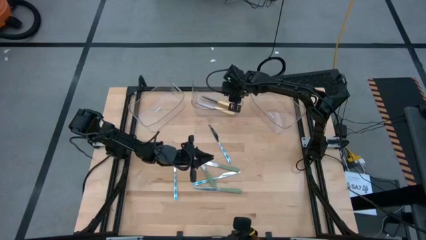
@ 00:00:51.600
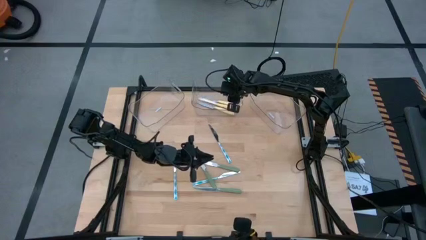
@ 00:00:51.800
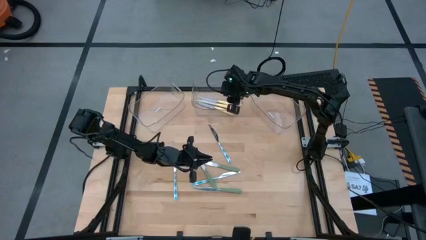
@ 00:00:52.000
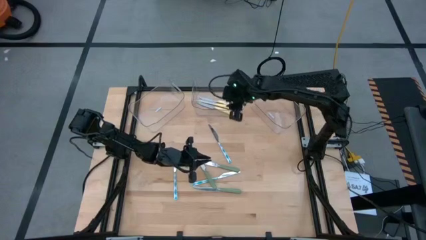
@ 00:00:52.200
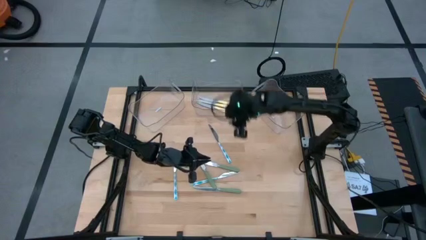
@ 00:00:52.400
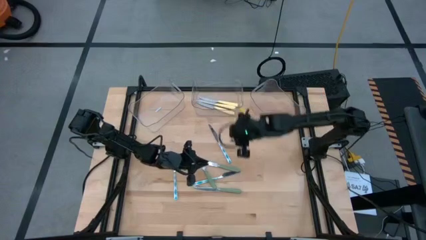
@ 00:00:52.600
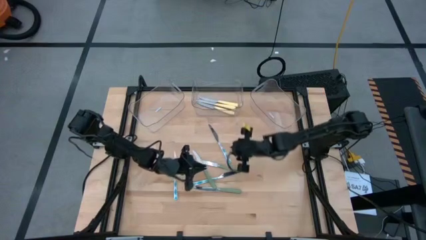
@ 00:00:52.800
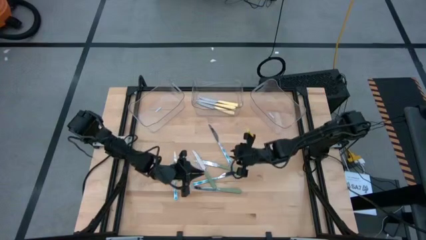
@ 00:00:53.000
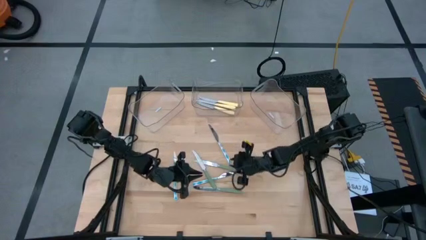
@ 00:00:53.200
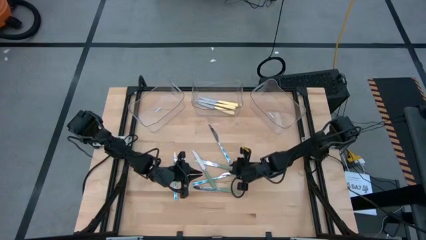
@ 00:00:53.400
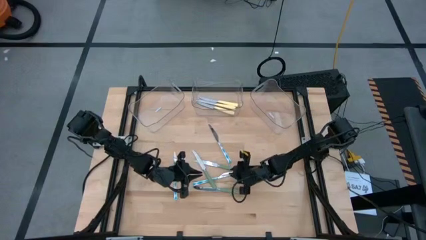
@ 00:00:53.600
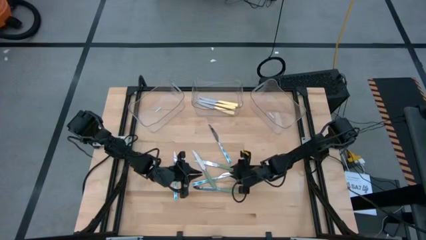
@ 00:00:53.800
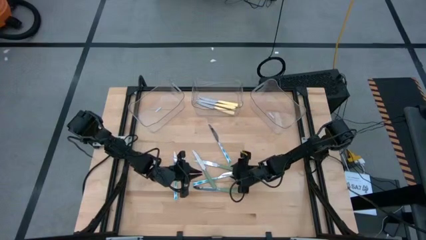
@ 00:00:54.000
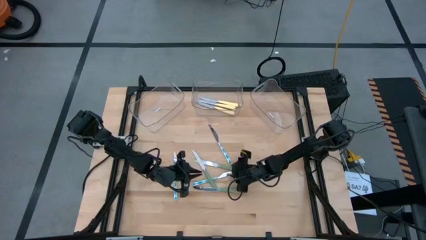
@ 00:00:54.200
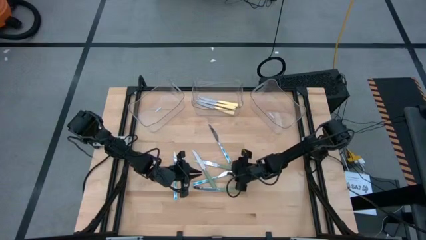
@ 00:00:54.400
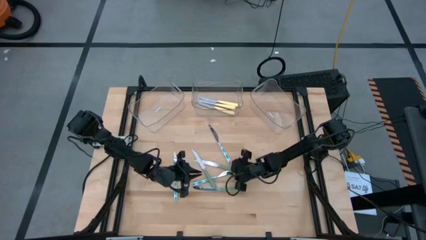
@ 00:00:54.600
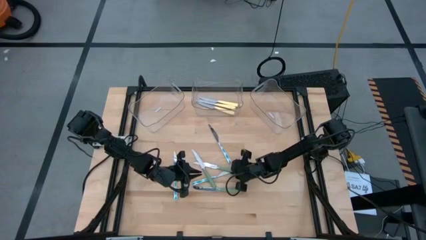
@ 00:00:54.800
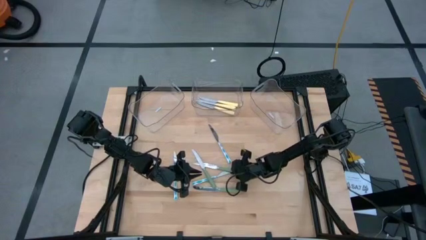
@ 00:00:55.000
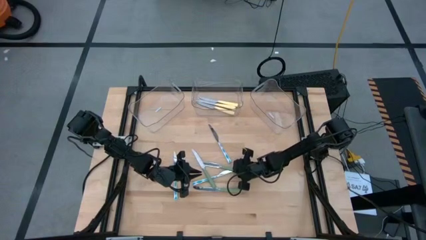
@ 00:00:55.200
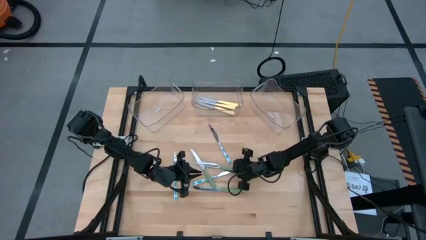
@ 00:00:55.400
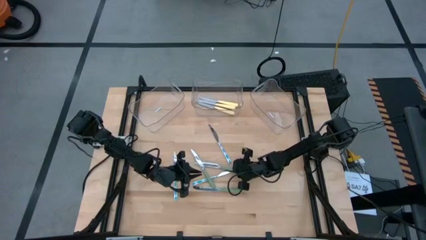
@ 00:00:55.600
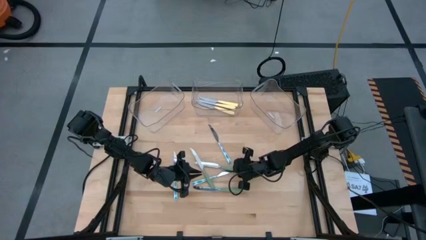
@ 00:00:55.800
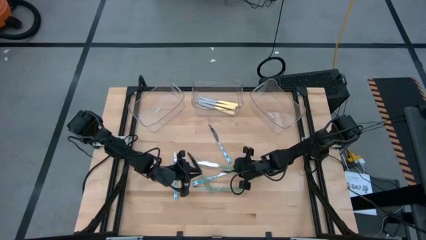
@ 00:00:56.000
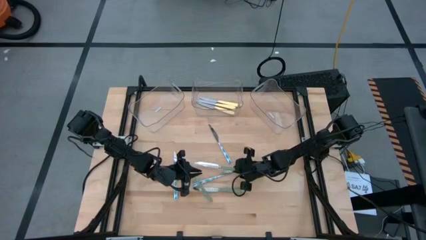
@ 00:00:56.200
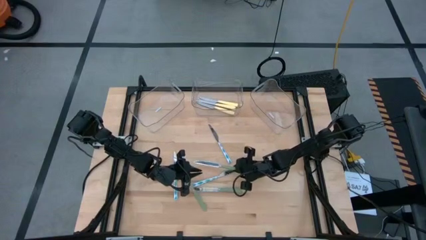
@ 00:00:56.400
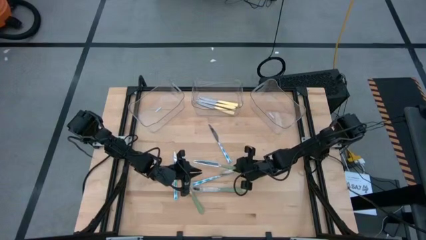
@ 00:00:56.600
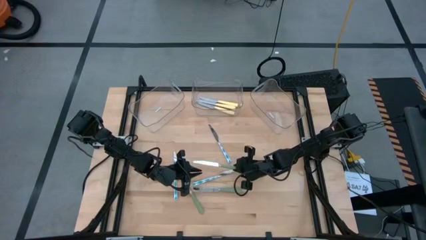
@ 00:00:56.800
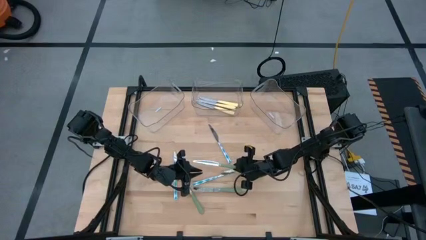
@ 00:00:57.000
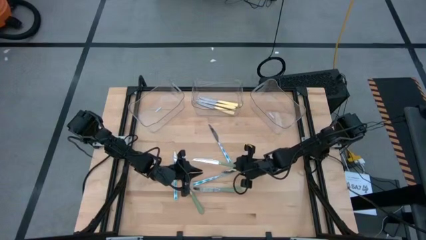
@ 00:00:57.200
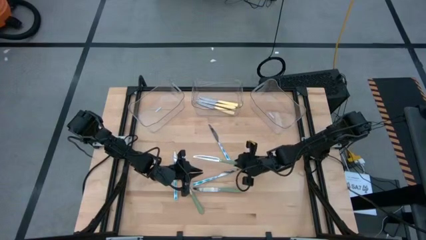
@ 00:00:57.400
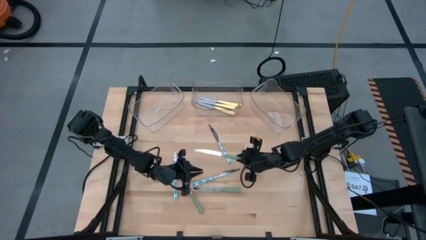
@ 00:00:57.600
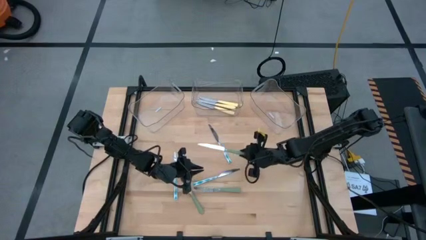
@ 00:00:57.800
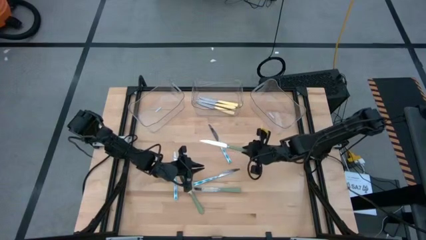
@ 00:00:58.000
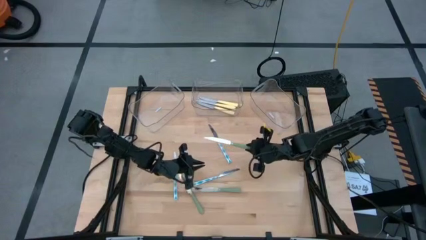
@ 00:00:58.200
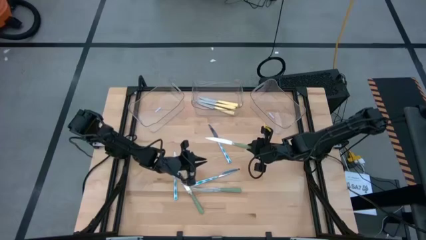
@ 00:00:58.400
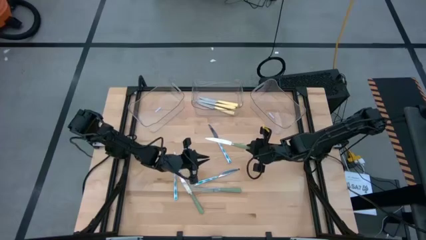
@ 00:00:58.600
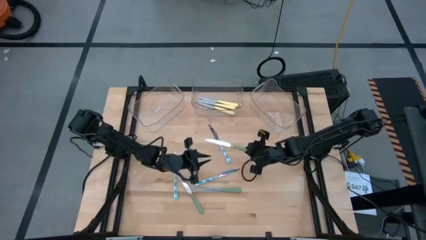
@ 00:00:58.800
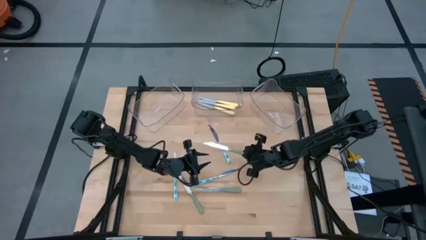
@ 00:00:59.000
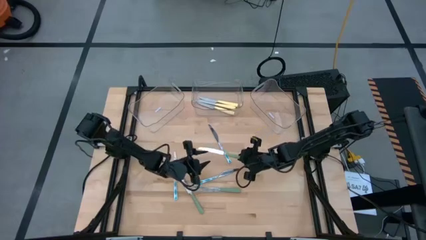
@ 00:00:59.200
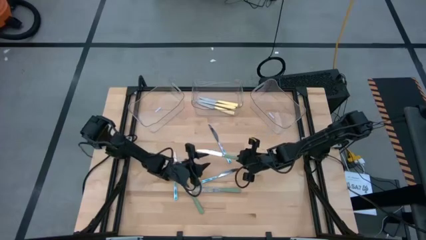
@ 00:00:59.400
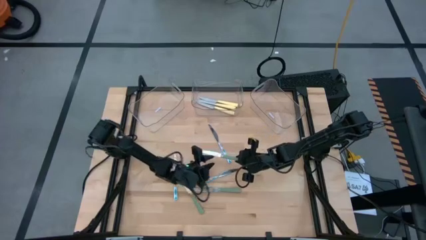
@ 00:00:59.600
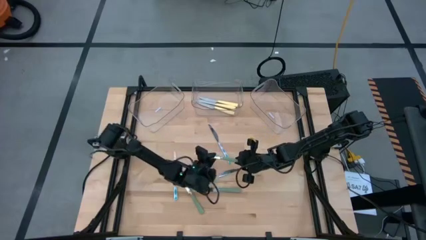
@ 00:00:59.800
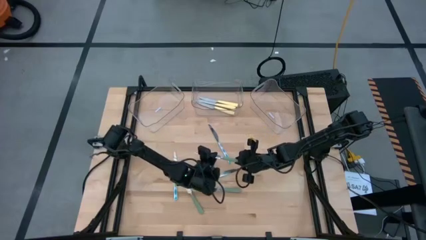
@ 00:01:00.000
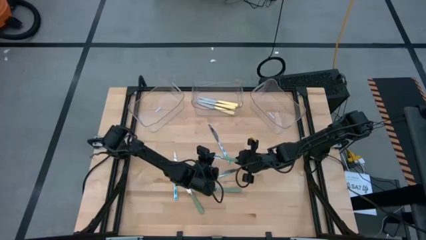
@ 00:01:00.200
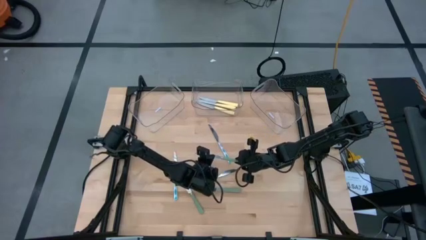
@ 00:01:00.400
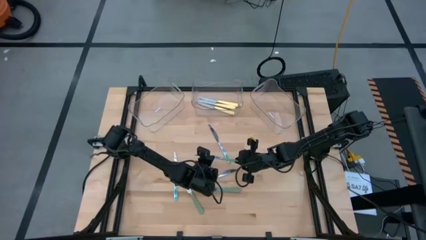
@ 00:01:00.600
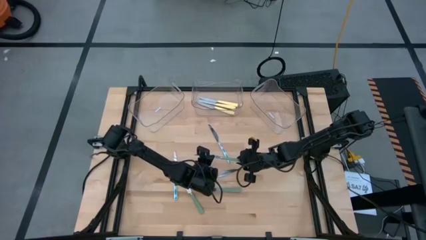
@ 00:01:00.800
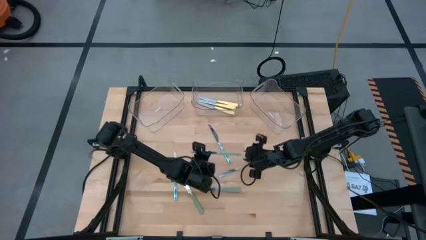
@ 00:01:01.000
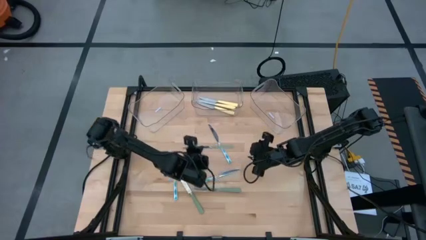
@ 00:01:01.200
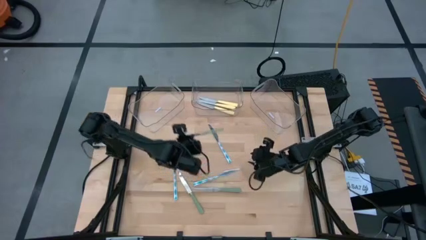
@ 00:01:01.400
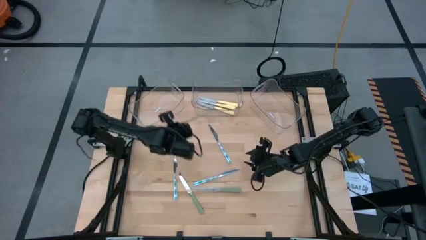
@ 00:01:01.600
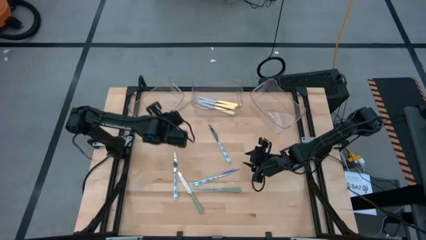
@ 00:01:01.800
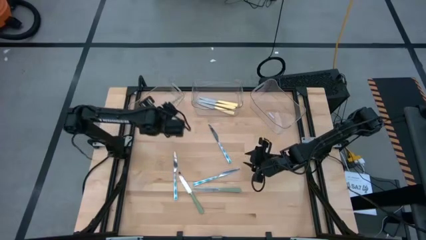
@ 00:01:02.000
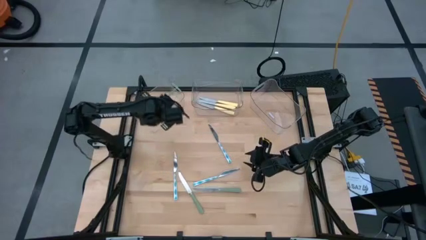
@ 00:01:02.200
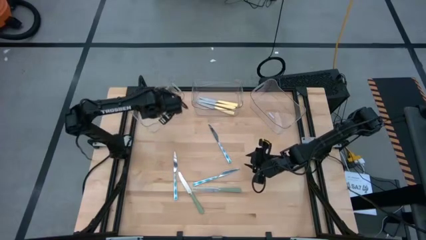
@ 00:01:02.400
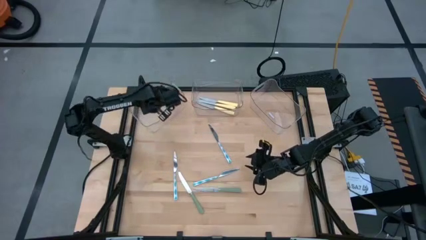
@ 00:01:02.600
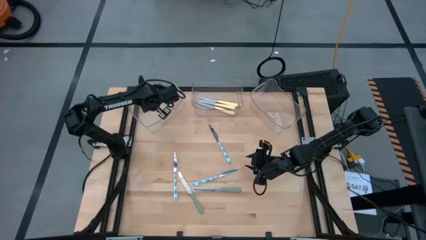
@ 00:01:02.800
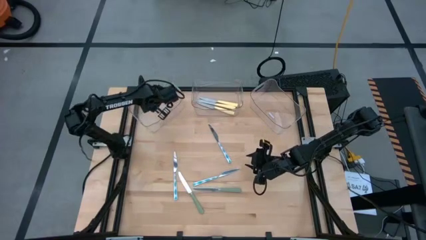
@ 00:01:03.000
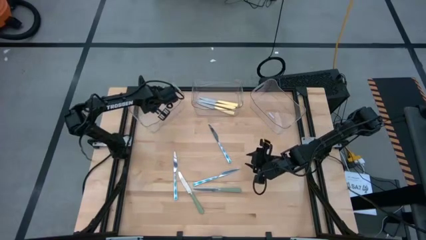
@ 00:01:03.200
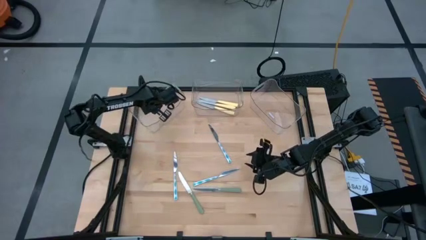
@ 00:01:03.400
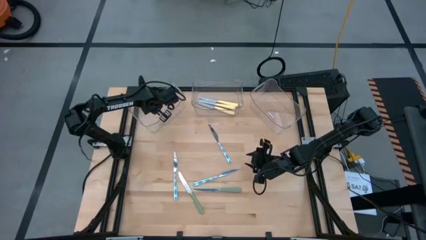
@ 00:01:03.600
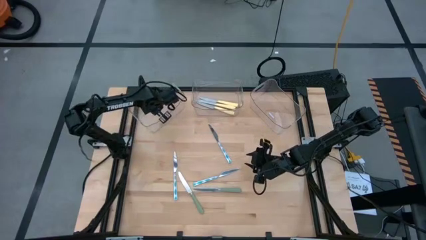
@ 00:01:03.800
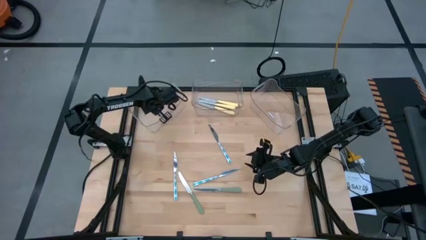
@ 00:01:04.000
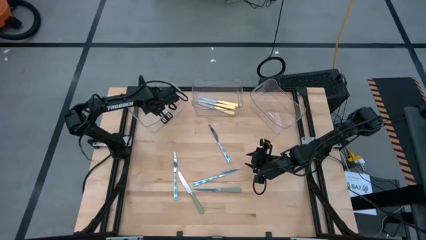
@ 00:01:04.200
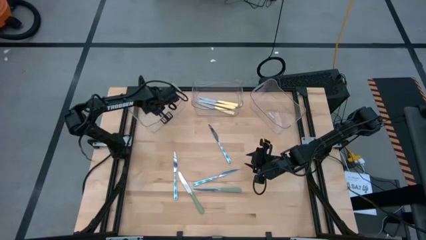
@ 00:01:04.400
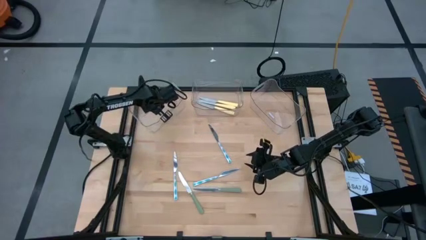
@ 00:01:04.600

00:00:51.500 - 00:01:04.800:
Task: Sort silverware by color (type)
Put the top green table knife into the left transparent bin

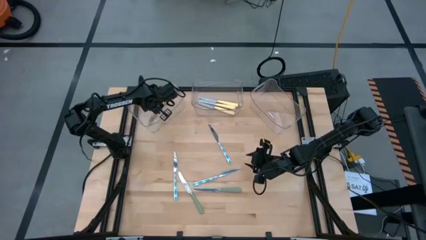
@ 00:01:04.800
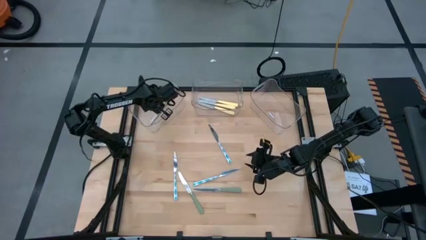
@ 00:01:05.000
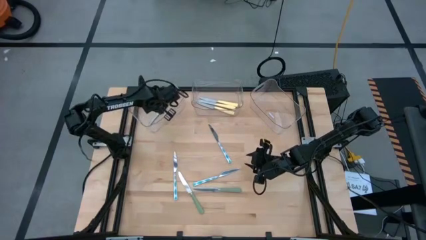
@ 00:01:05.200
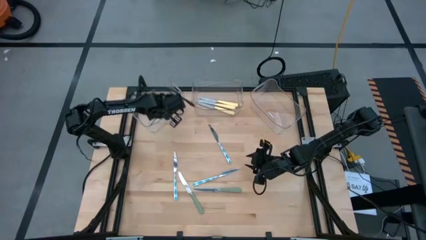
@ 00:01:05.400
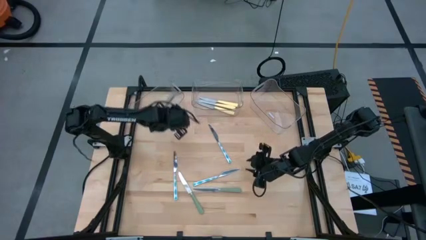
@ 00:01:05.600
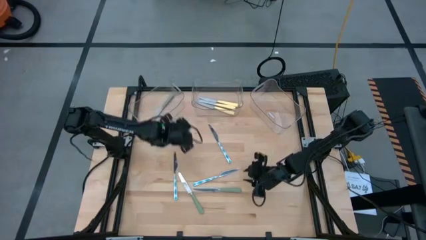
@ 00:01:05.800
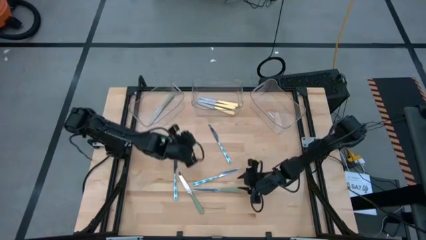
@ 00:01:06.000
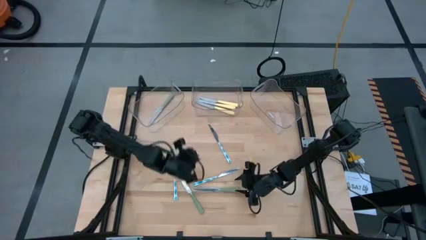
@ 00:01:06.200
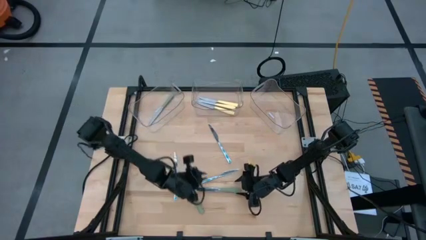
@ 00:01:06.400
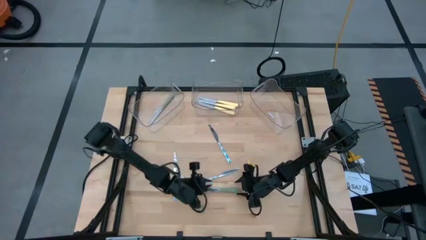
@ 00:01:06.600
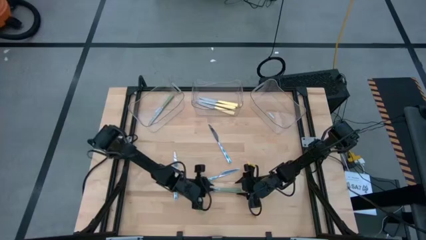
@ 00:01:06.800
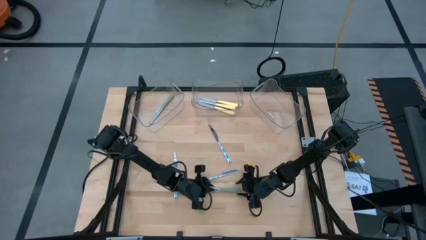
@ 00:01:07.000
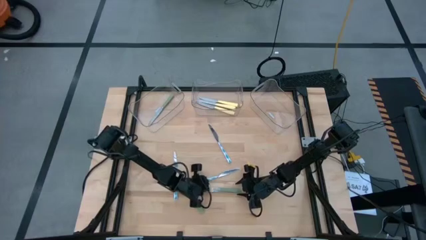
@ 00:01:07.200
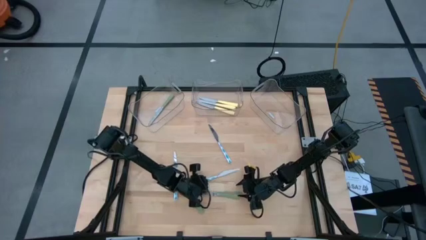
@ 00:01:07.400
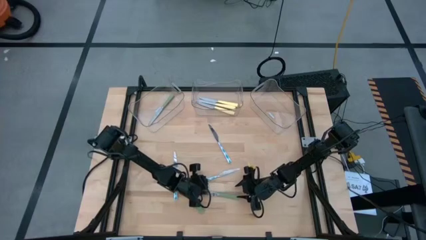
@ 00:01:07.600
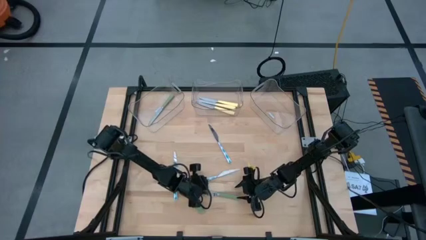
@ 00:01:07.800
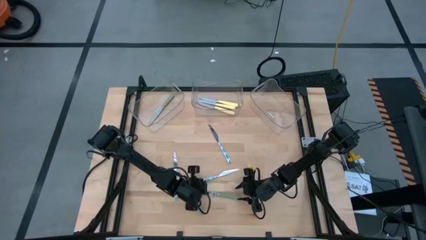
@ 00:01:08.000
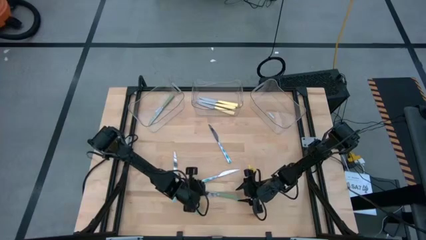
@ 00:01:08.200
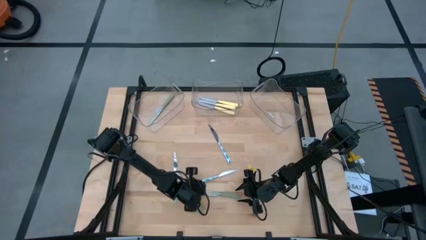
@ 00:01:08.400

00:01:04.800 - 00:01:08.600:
Put the right green table knife into the left transparent bin
